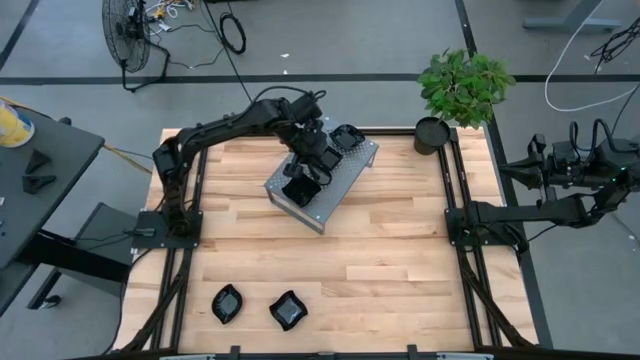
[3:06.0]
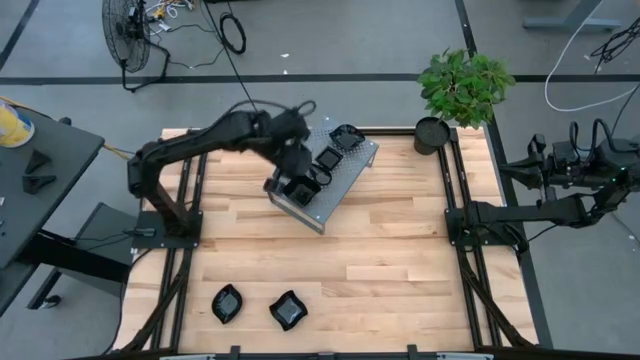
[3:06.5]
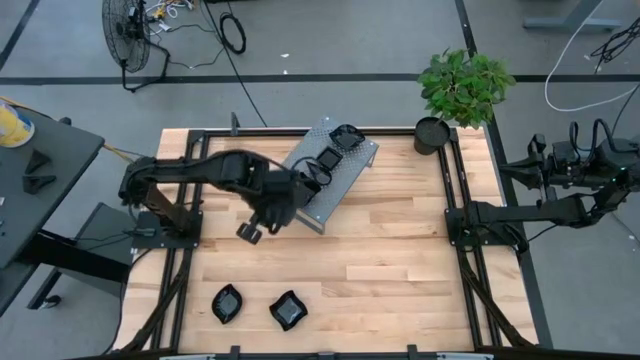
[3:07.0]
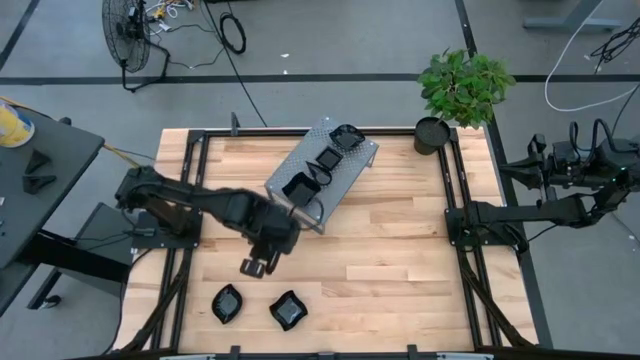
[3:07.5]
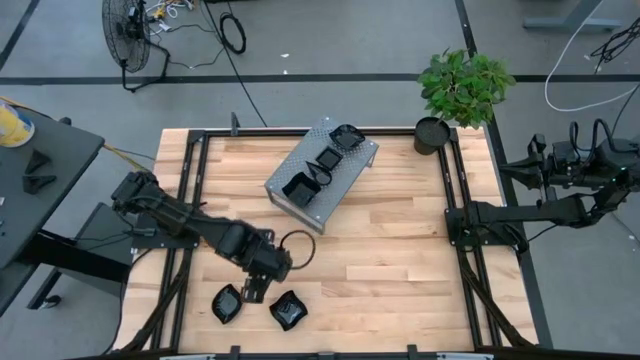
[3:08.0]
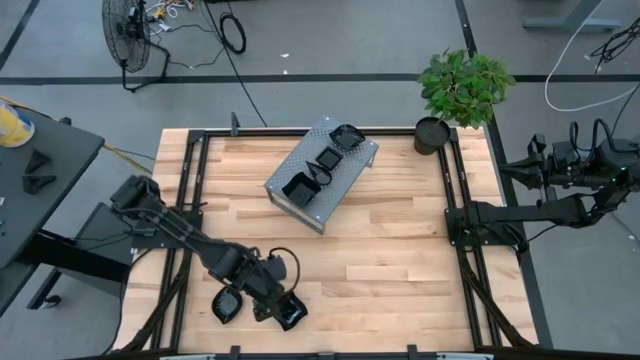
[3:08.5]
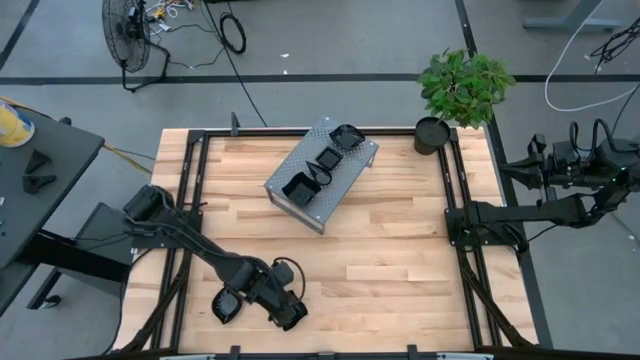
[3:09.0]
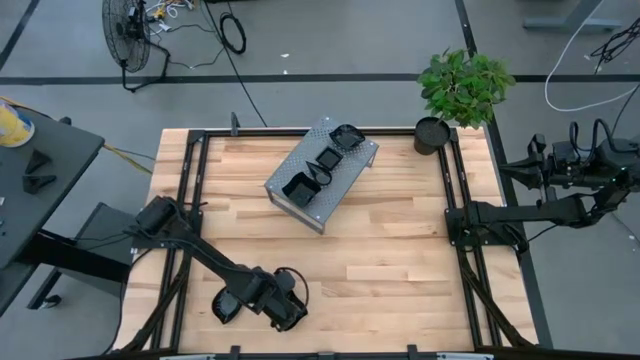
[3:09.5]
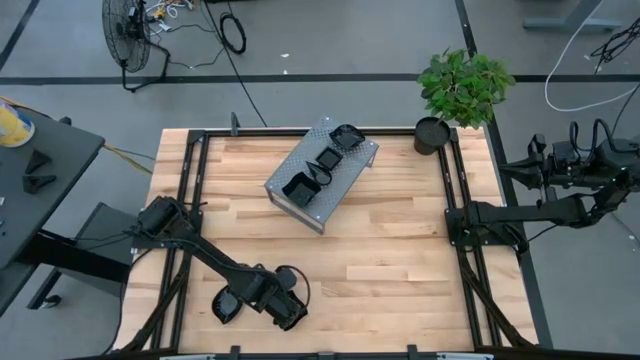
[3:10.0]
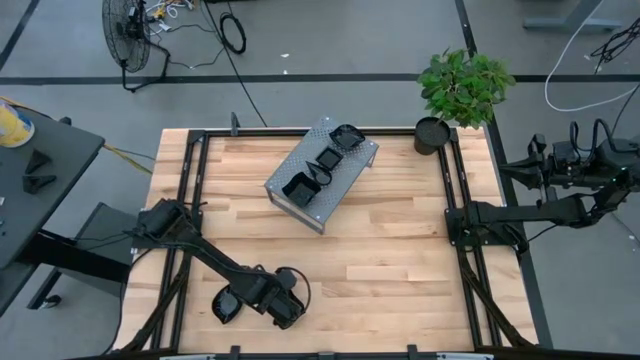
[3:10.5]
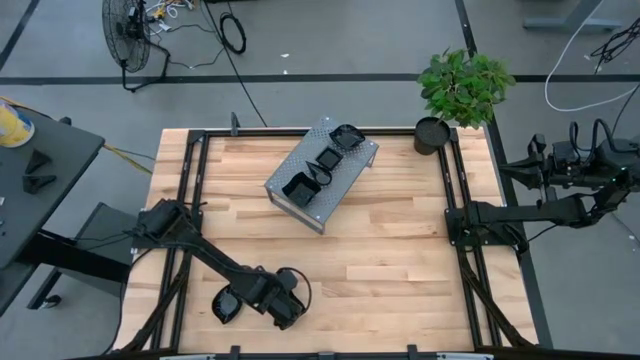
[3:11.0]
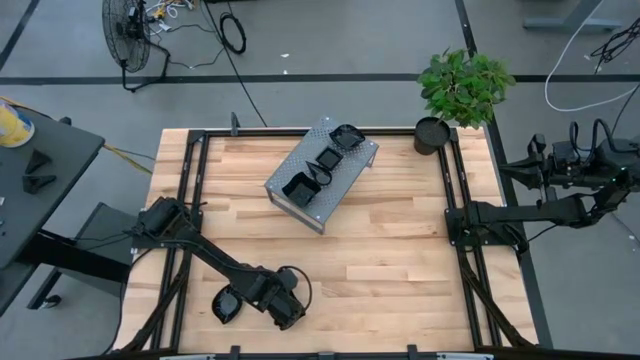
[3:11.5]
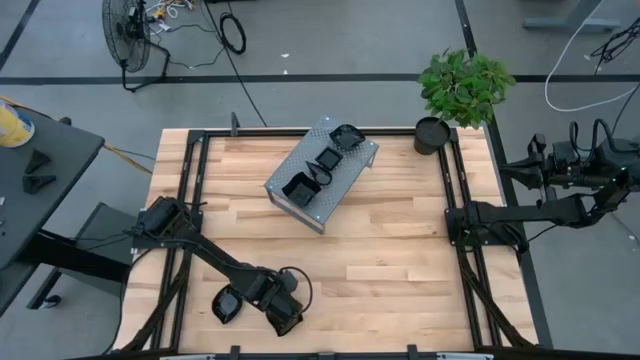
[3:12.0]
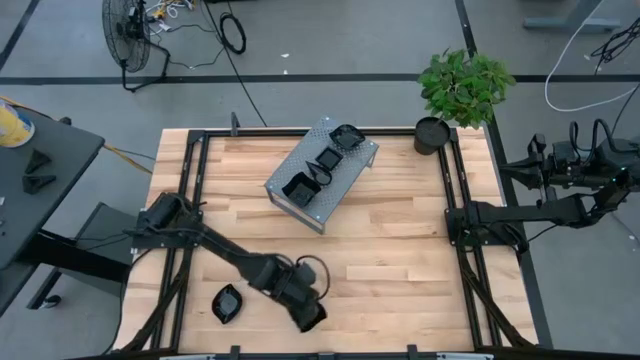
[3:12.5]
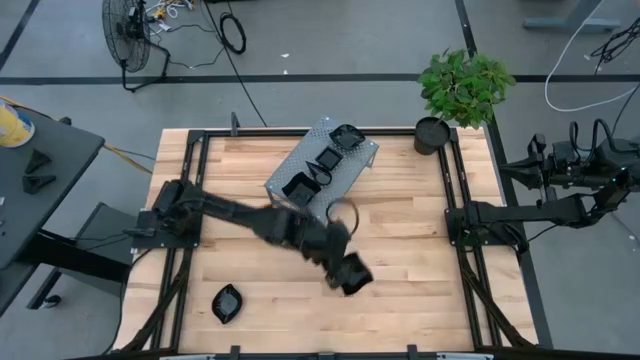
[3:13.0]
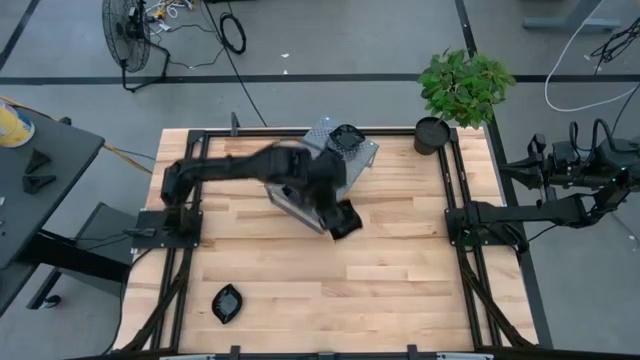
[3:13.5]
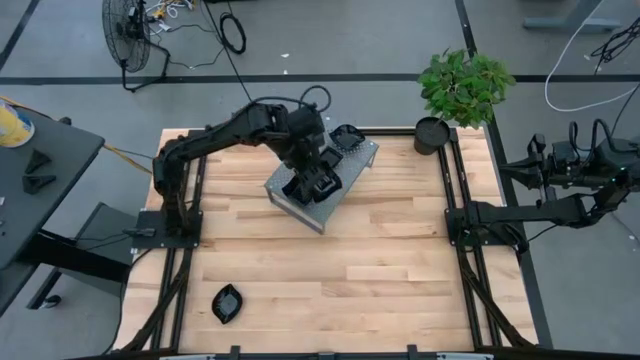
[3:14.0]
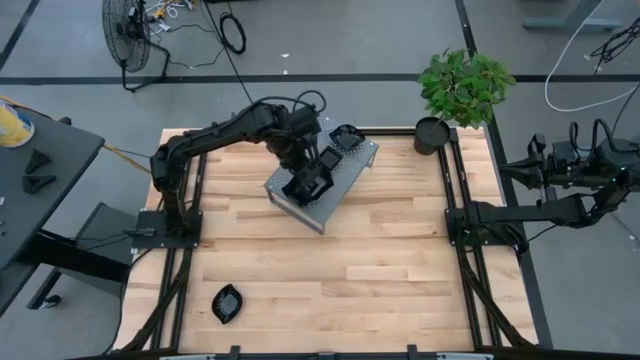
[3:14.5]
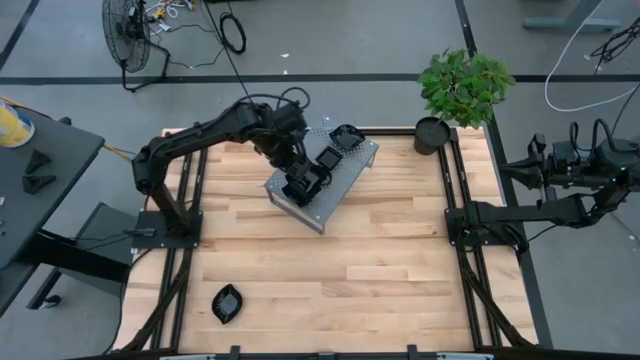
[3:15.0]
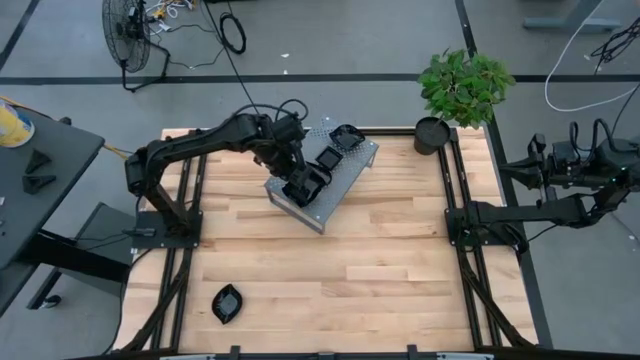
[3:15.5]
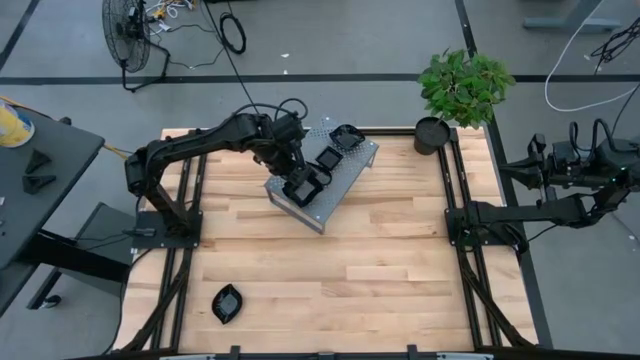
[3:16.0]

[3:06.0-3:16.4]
Task: Pick & Place Mini shaped plates
Stack the black distorted square shaped plate on top of the black distorted square shaped plate on the shelf

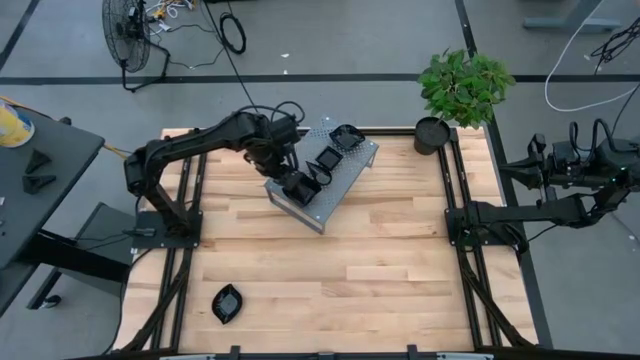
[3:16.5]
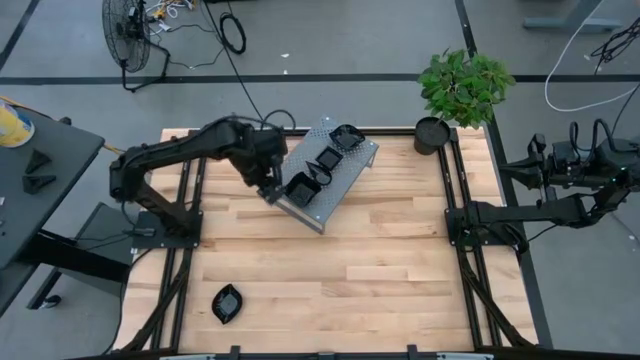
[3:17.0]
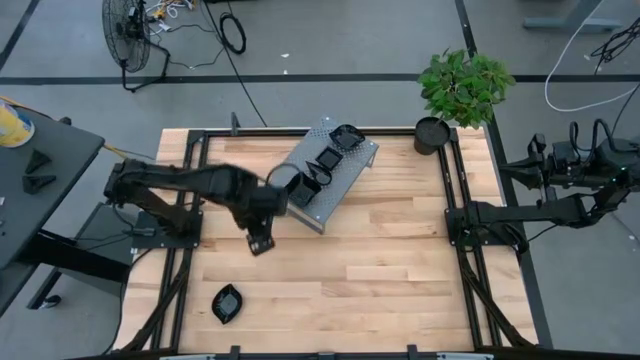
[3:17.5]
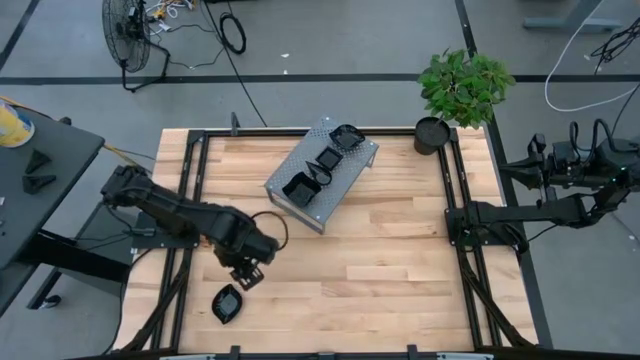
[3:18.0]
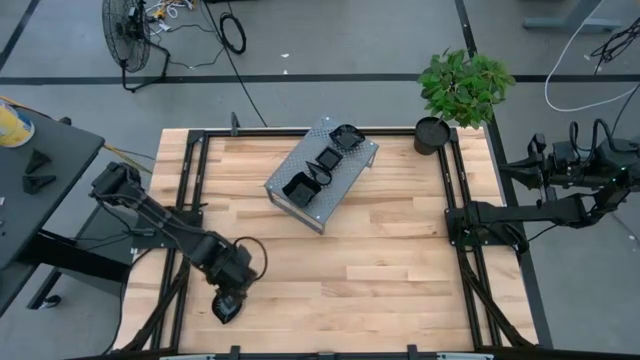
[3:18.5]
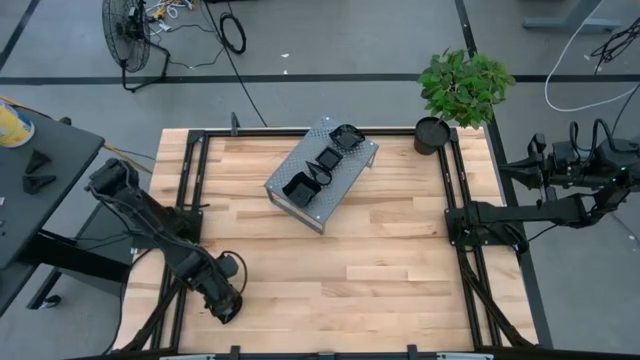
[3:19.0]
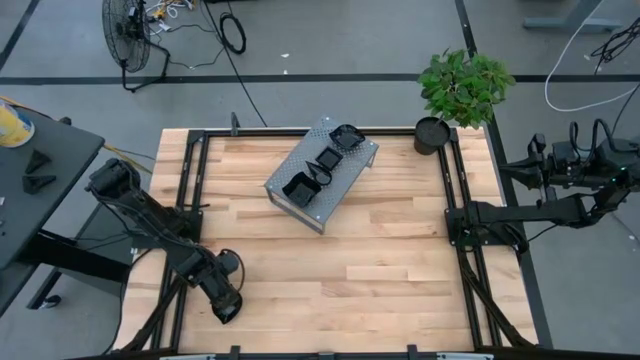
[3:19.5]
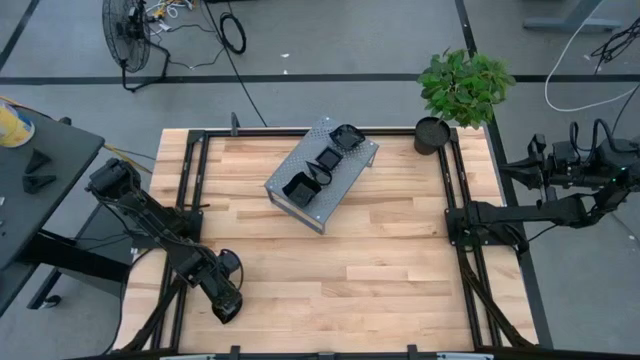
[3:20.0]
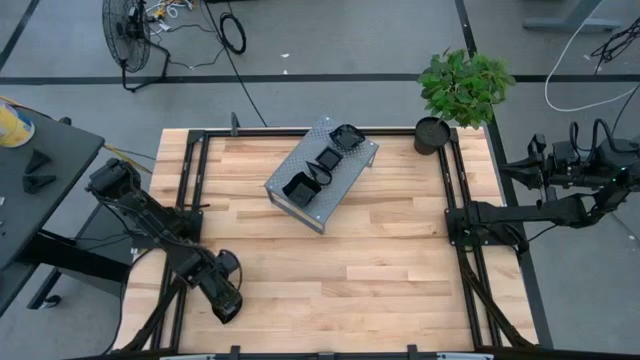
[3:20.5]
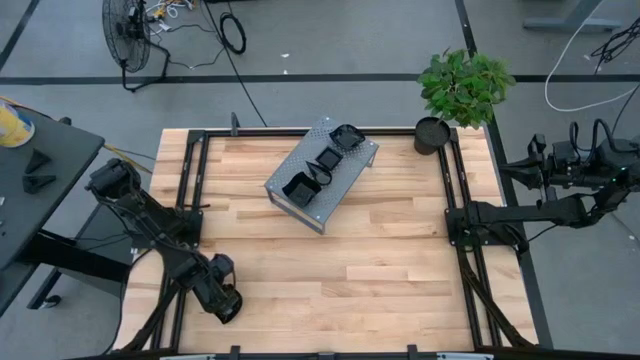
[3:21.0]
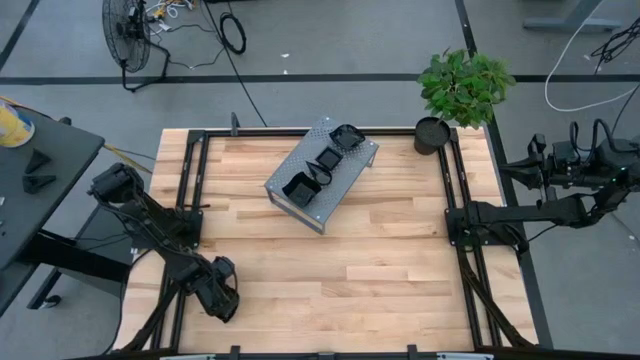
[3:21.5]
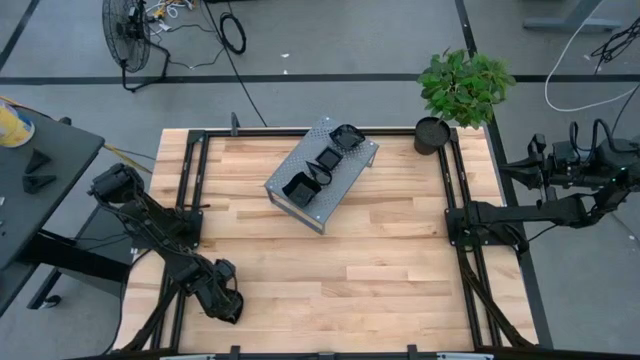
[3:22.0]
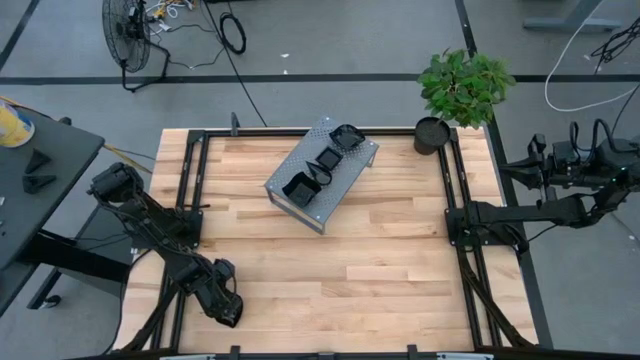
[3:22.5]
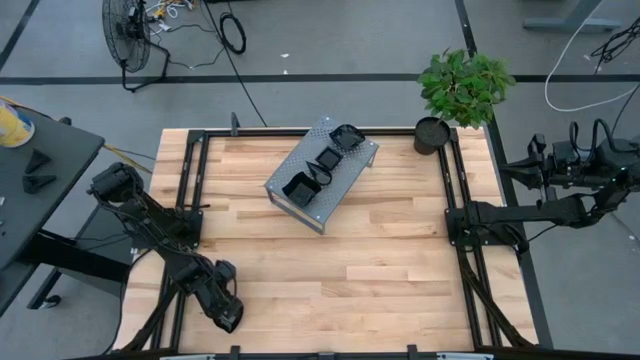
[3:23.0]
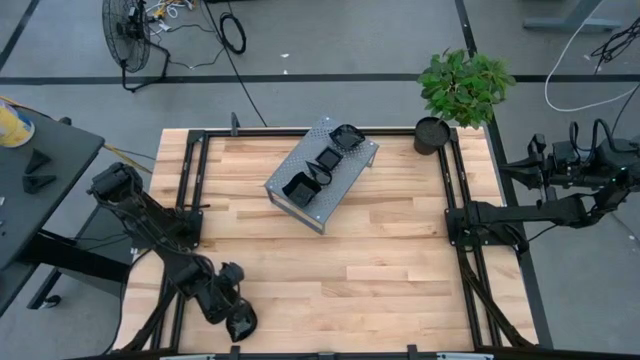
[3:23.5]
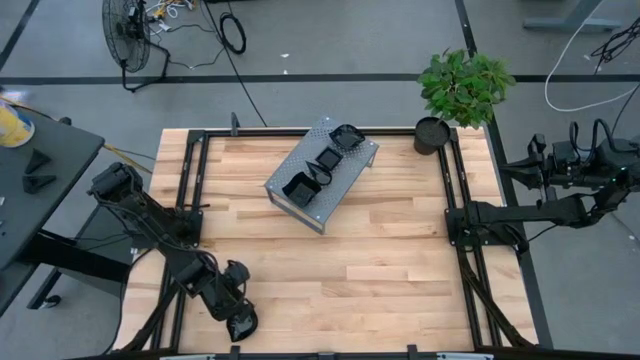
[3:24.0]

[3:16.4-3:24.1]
Stack the black leaf shaped plate on top of the black leaf shaped plate on the shelf

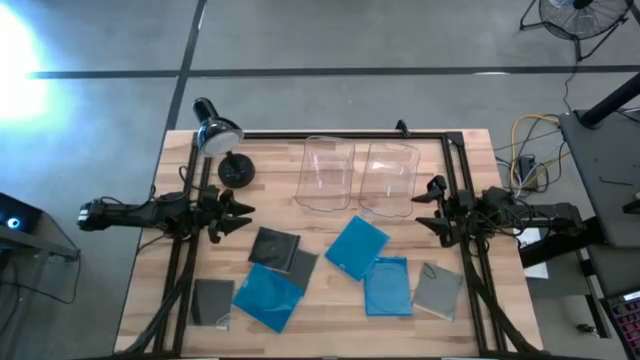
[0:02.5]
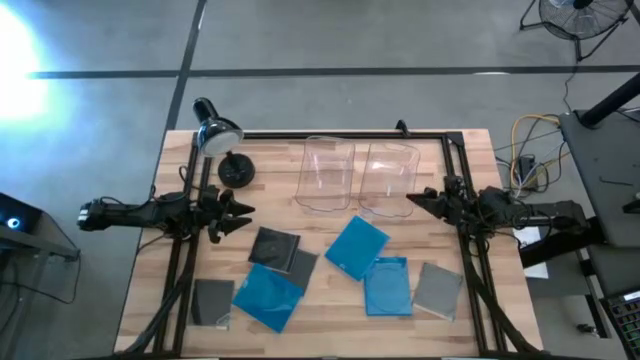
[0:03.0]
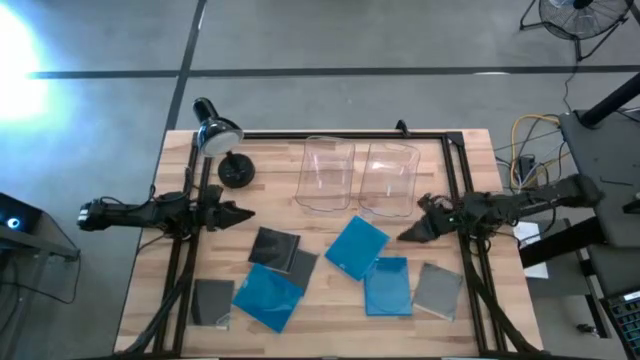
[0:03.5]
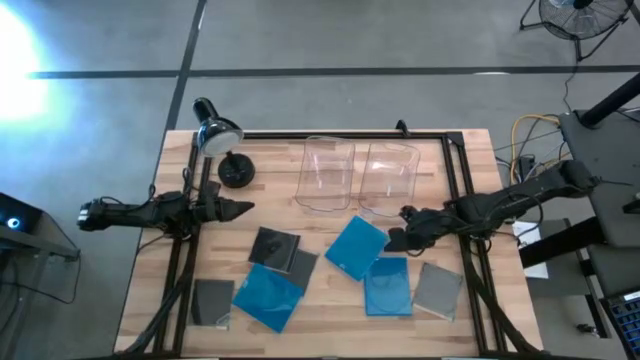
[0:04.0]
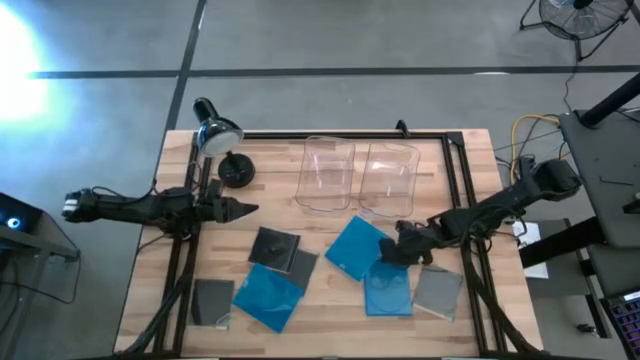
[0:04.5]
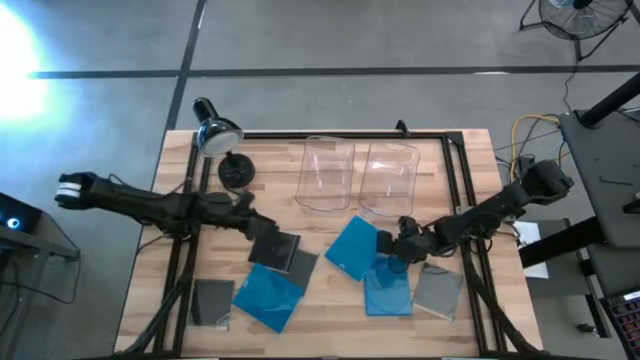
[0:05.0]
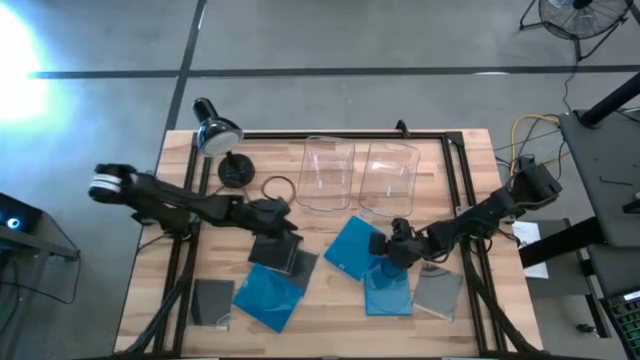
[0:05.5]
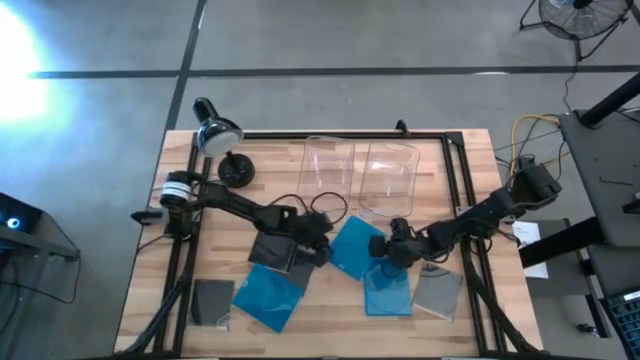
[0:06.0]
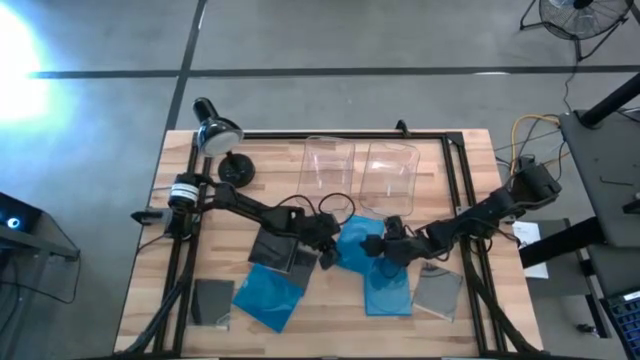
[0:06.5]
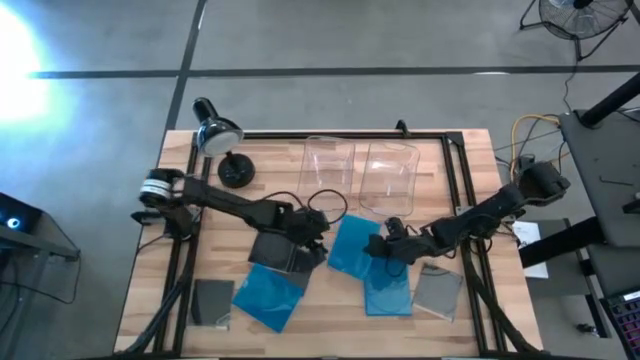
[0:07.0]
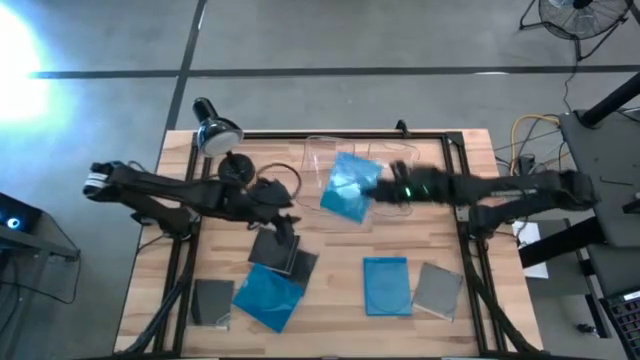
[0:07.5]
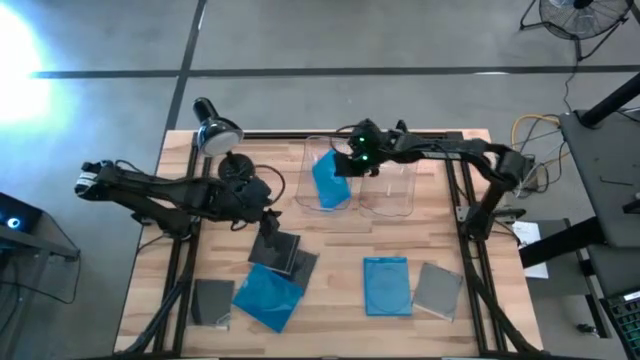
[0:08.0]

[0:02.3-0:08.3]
Task: Pick & place jewel cases by type
Put the blue CD case into the left transparent bin
